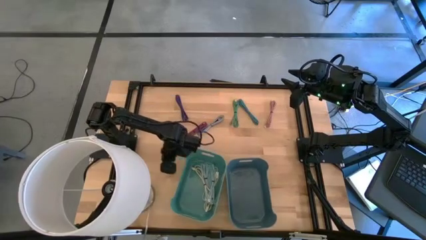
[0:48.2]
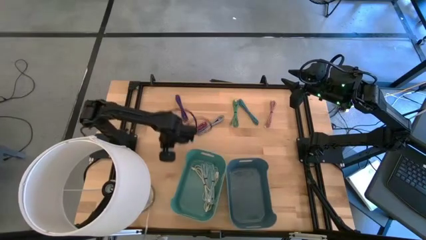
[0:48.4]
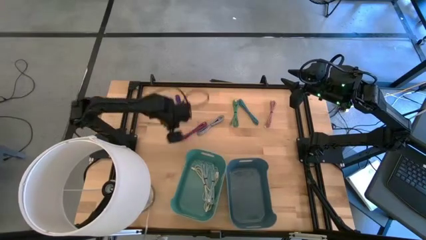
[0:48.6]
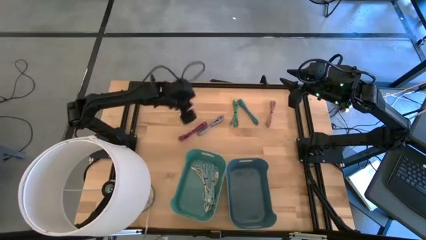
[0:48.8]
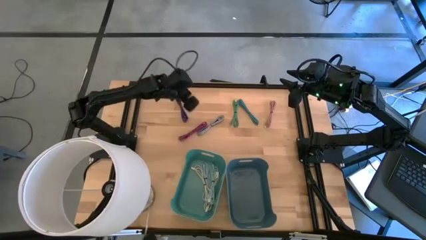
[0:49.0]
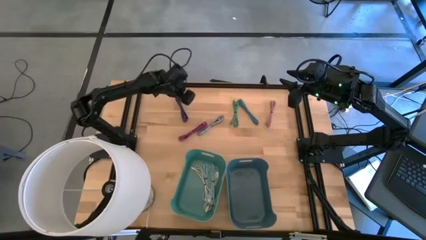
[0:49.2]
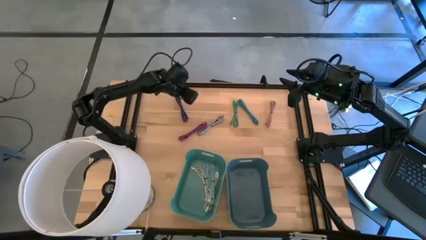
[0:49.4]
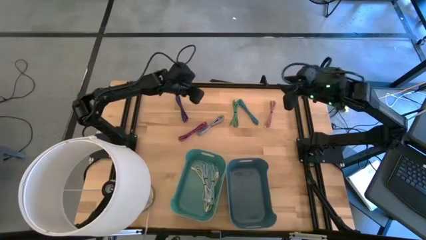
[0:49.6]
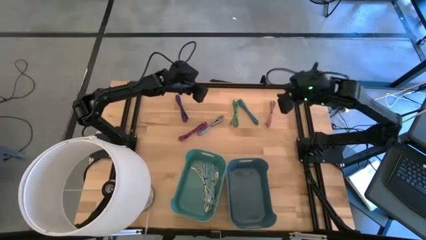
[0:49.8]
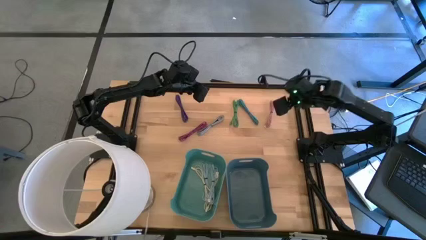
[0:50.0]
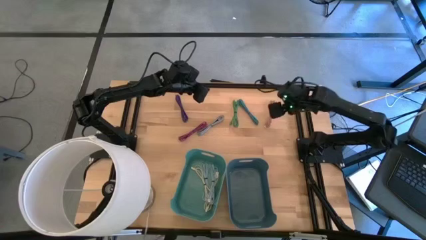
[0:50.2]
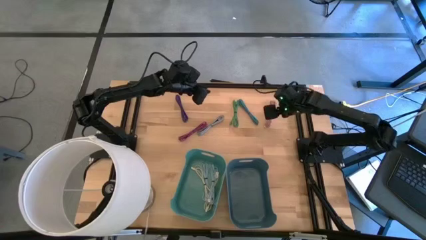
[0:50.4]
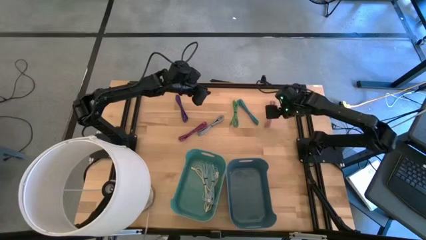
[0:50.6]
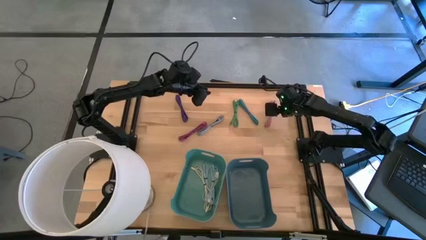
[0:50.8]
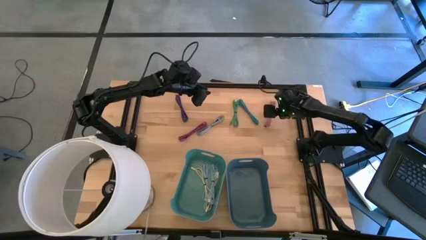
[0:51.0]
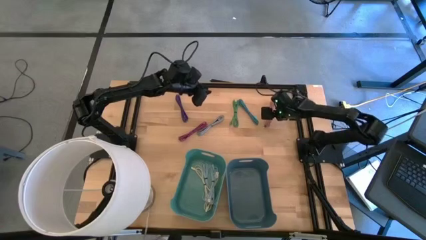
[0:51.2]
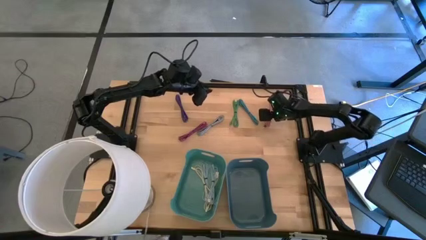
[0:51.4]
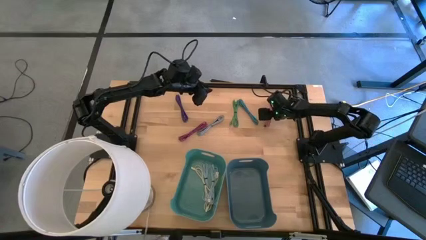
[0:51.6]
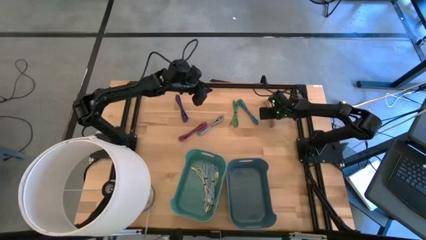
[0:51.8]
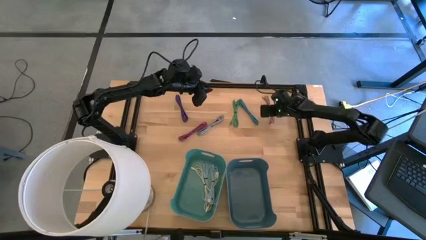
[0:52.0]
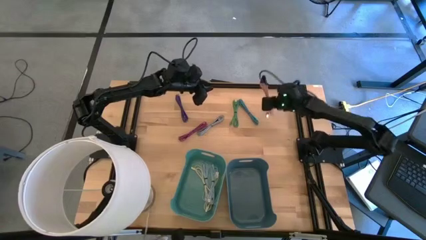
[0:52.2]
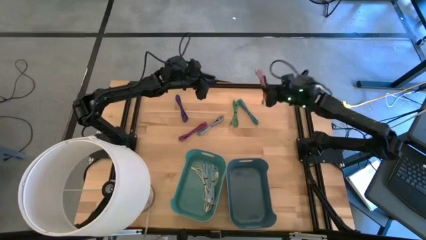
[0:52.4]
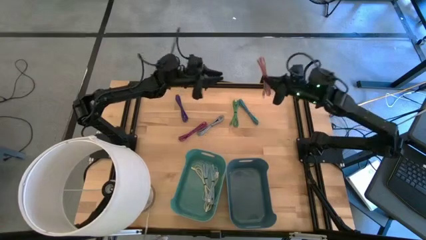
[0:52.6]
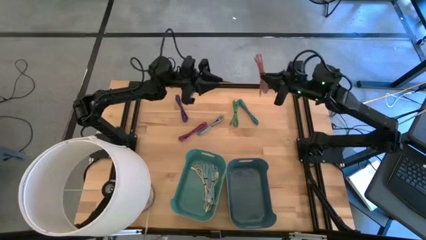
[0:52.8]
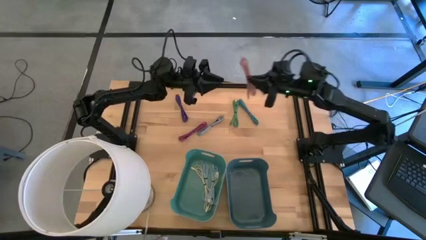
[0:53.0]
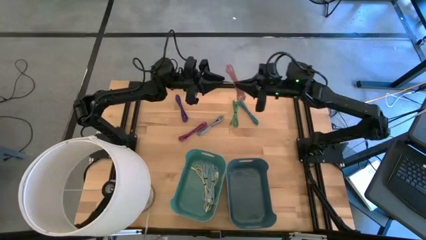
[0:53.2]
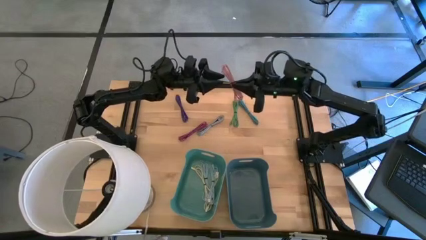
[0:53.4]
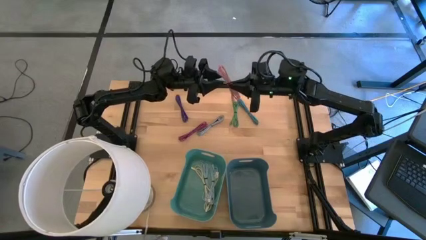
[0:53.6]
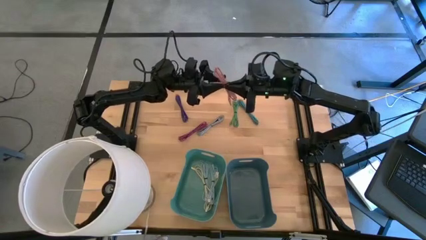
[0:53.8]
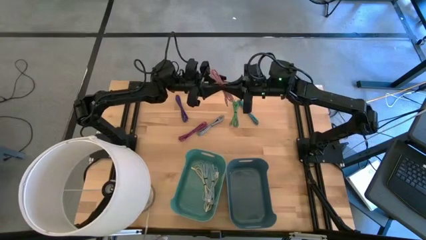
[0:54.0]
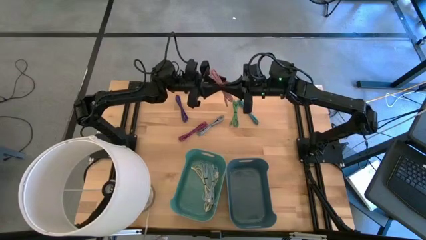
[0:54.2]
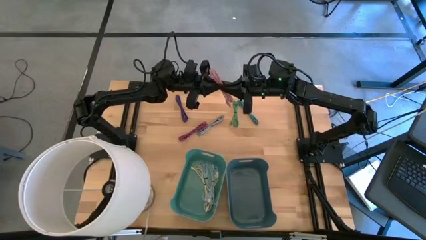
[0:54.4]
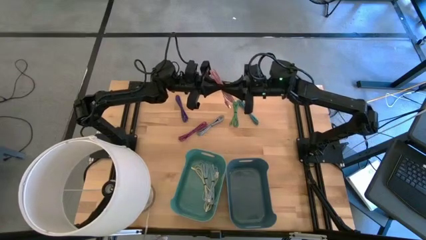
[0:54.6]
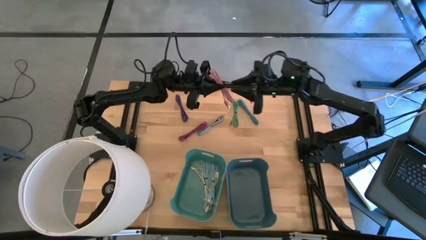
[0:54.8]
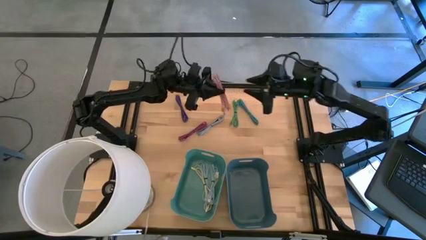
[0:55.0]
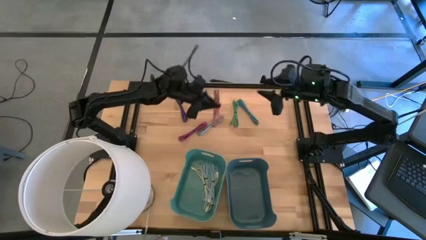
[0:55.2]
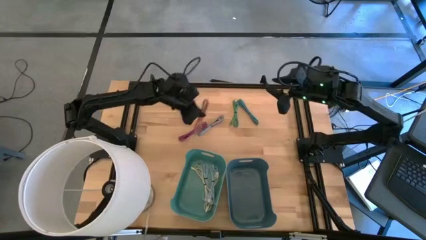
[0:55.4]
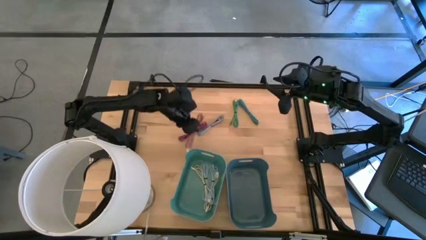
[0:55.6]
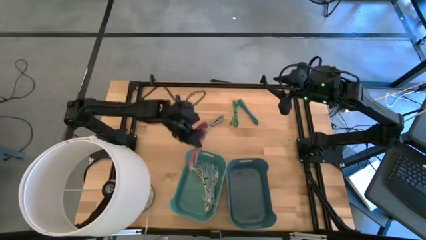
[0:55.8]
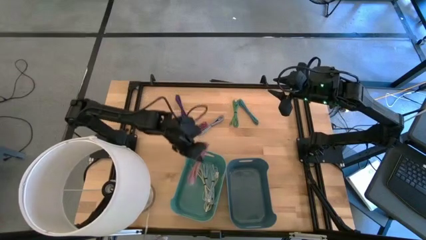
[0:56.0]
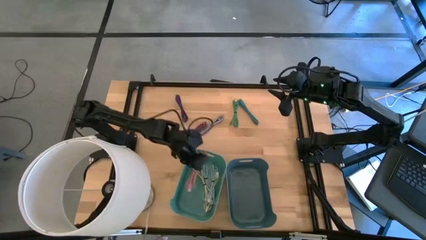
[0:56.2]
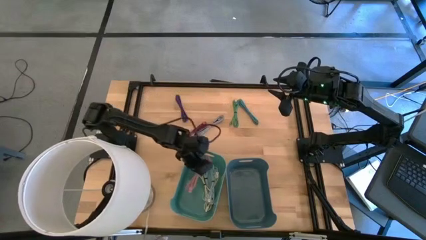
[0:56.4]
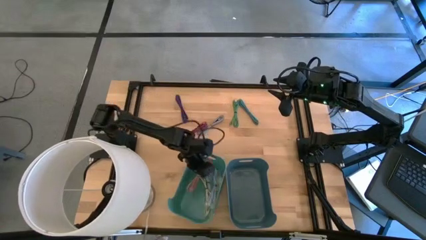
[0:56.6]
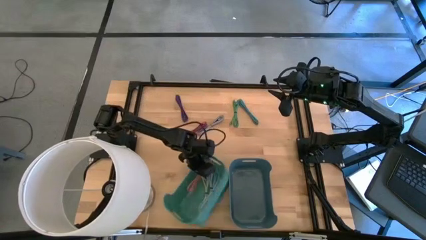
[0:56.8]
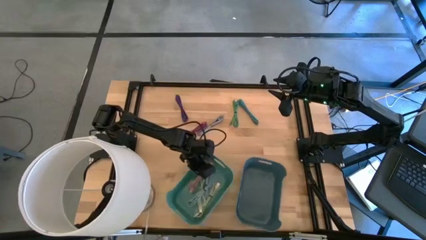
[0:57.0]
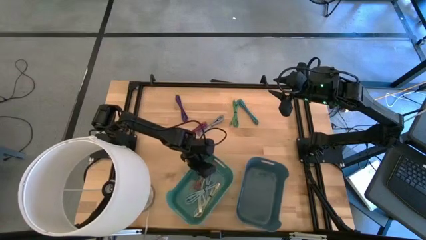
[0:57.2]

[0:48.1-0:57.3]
Put the light pink charger cable into the green bin

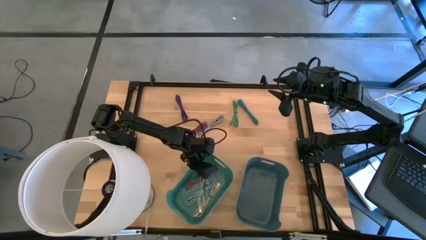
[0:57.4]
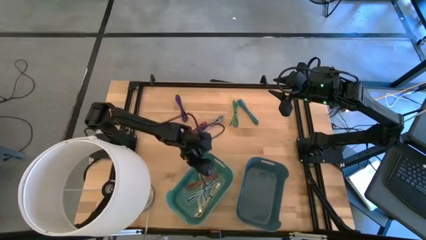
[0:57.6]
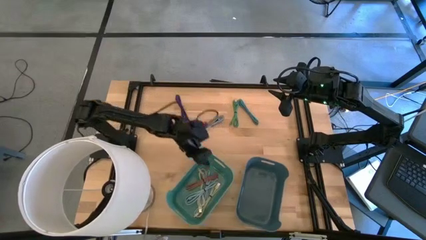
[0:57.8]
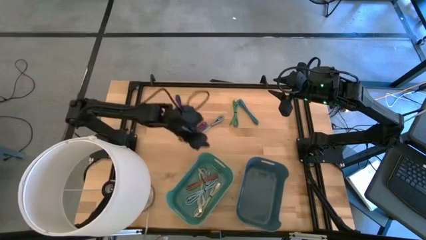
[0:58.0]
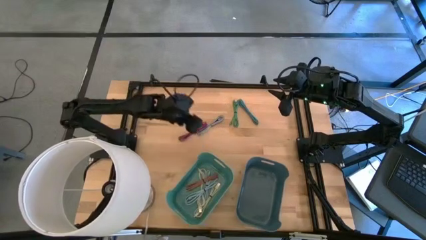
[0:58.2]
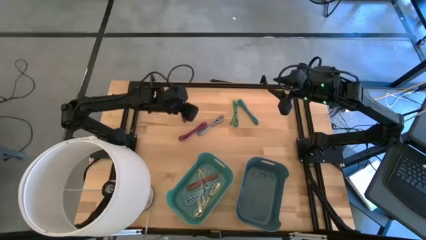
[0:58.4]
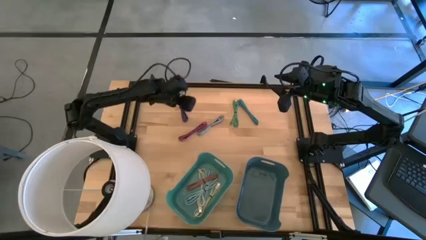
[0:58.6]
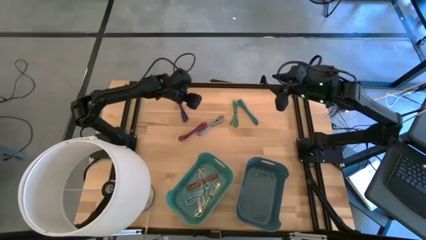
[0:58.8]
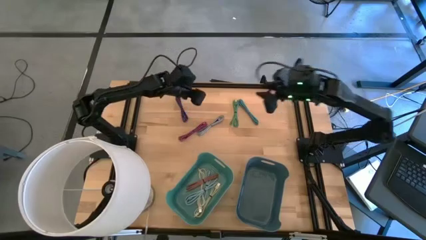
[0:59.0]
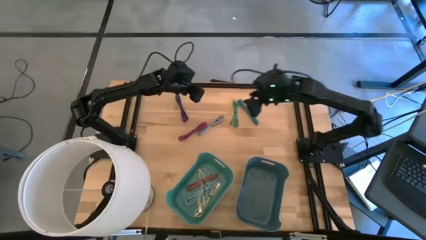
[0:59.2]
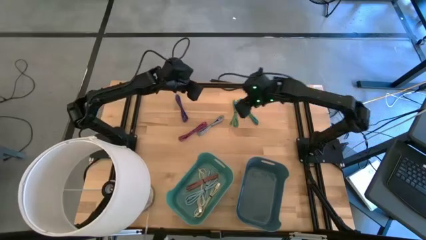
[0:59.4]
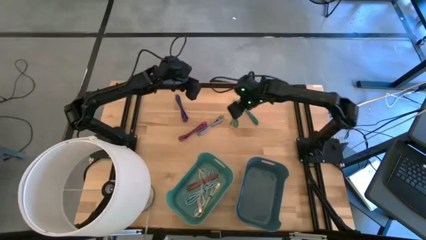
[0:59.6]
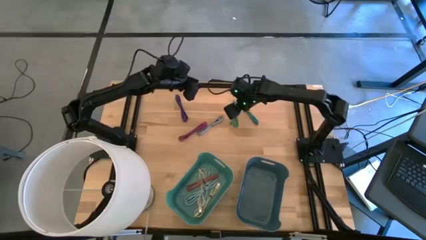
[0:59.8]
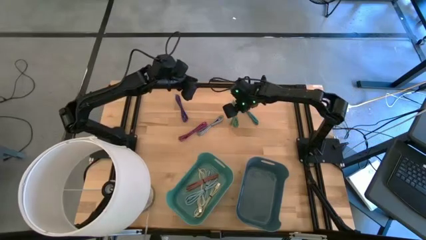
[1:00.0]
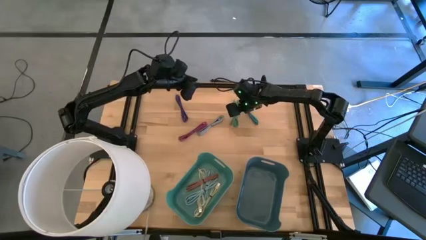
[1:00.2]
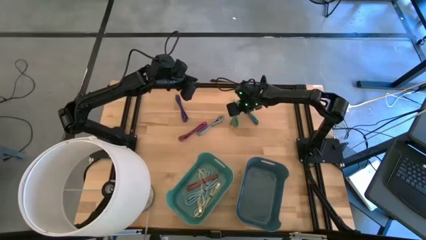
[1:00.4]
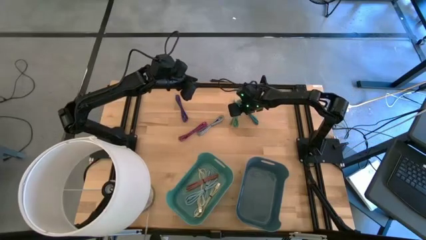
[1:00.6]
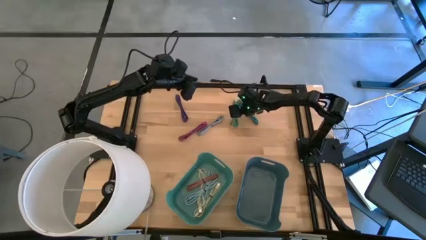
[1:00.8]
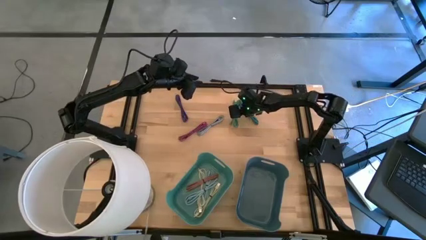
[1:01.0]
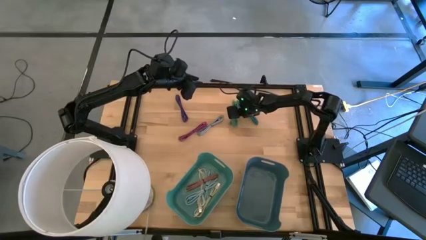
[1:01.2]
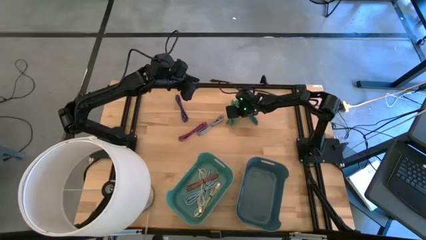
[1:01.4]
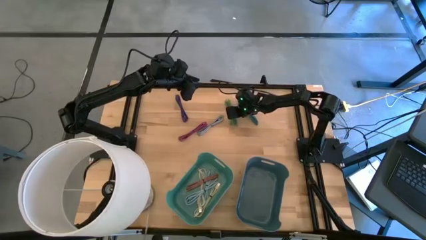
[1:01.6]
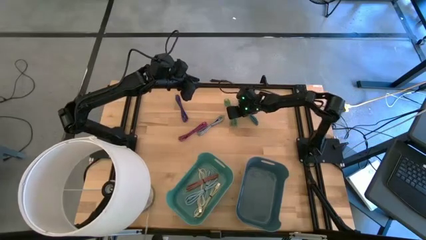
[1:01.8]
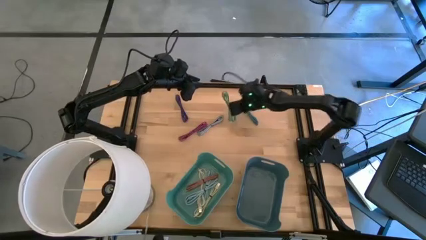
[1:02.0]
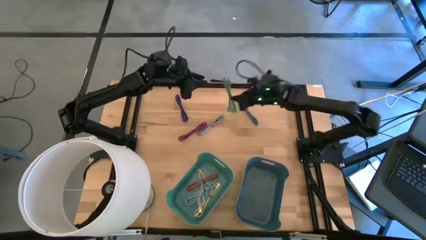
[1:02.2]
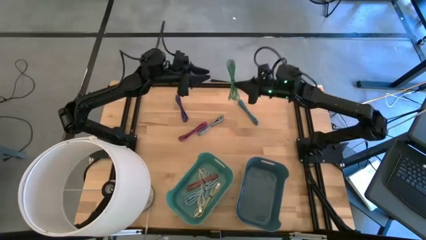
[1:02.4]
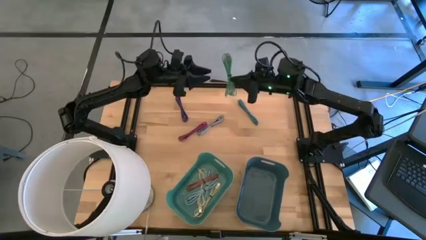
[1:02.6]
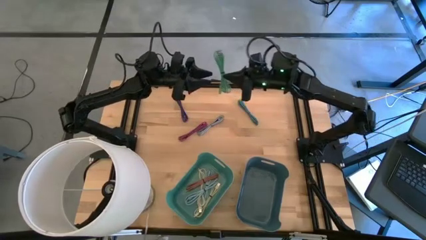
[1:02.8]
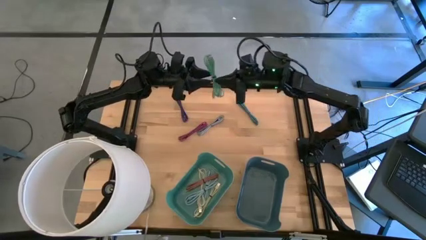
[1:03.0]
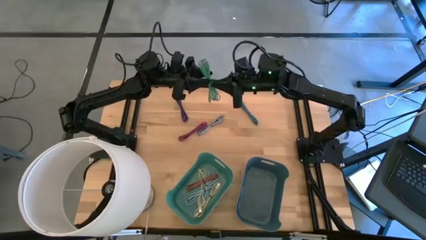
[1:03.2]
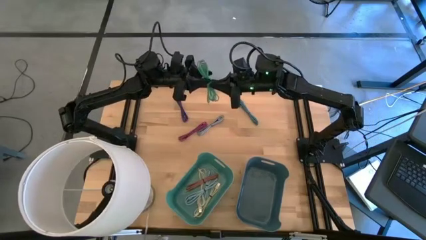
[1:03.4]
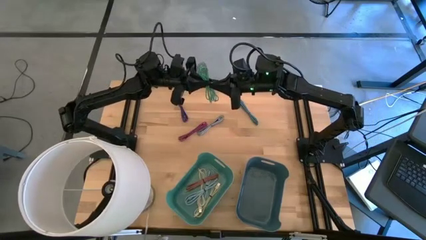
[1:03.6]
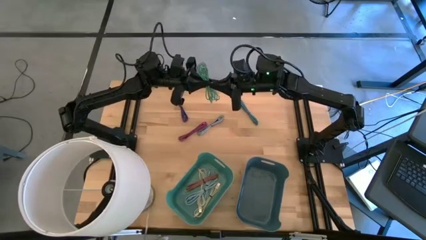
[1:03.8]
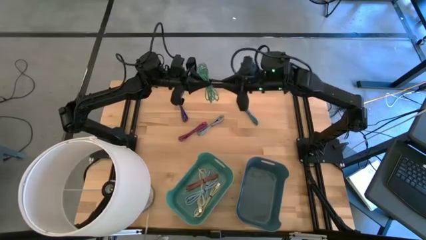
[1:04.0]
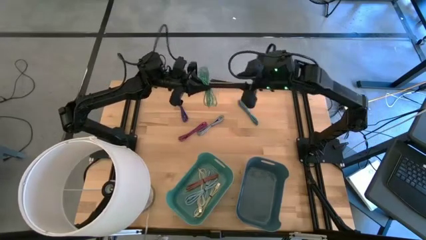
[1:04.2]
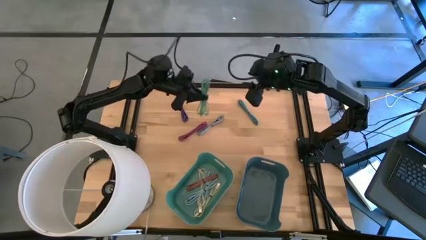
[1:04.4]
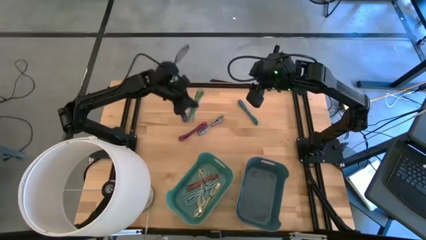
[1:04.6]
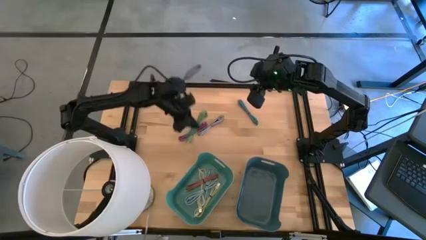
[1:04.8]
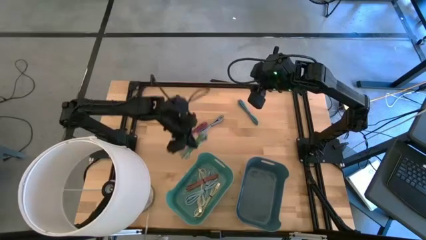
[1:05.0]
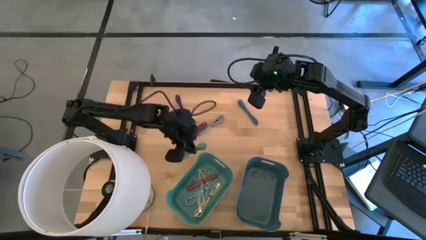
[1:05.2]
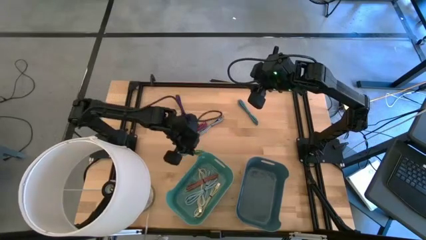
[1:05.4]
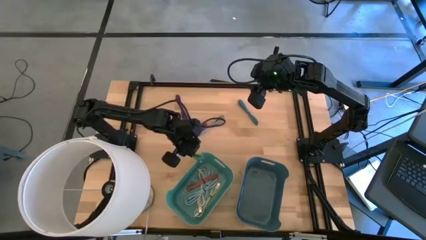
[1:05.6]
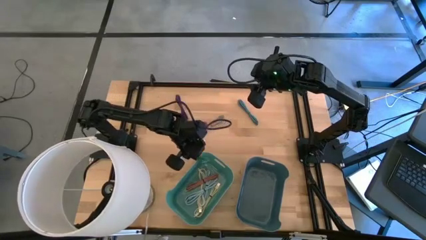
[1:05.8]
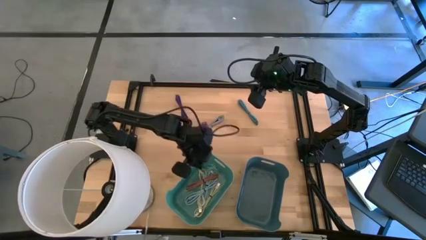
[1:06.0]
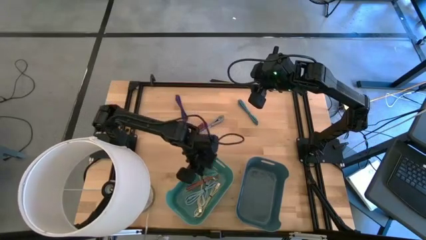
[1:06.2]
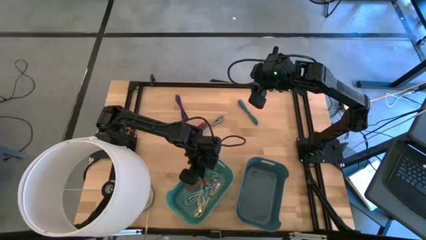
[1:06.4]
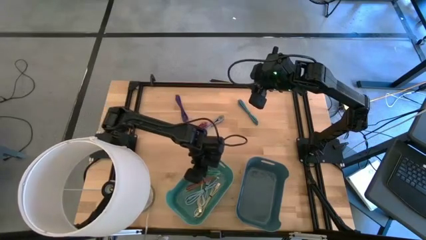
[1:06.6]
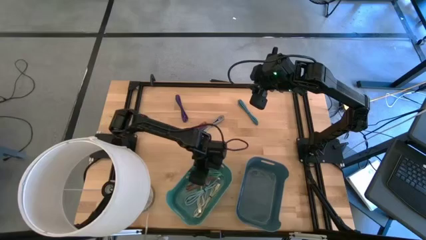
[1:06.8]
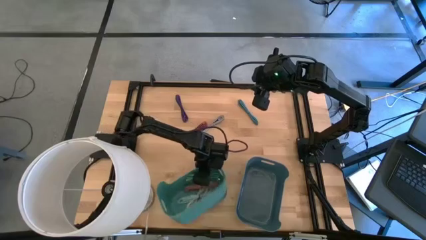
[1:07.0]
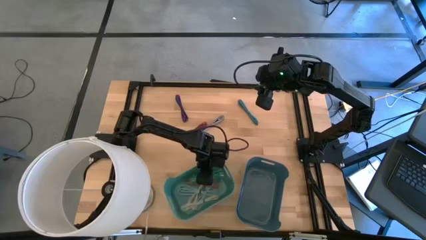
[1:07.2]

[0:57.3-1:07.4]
Put the green charger cable into the green bin
